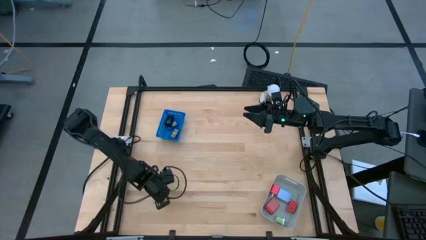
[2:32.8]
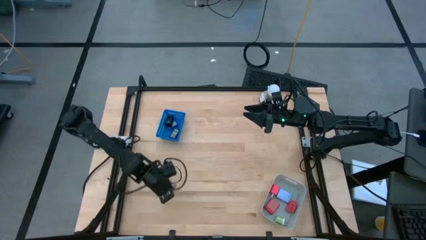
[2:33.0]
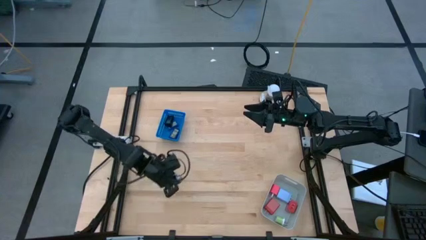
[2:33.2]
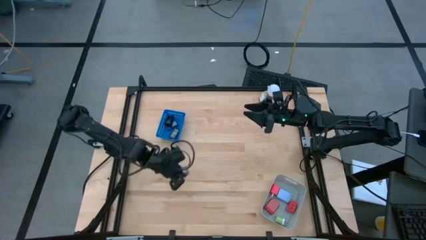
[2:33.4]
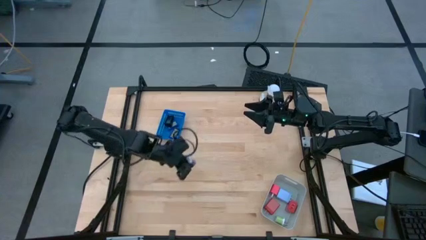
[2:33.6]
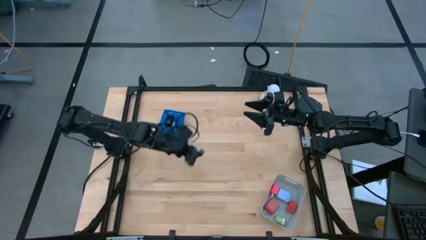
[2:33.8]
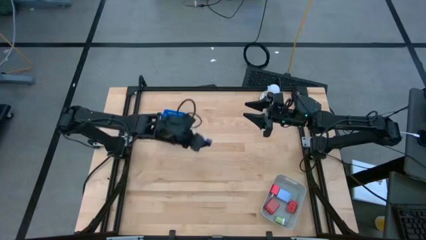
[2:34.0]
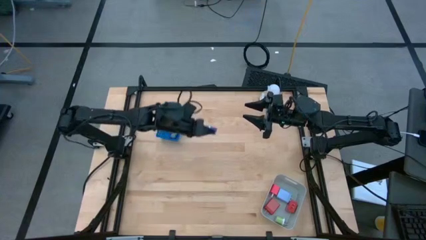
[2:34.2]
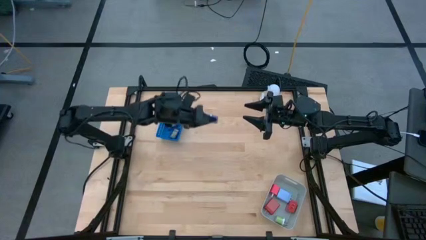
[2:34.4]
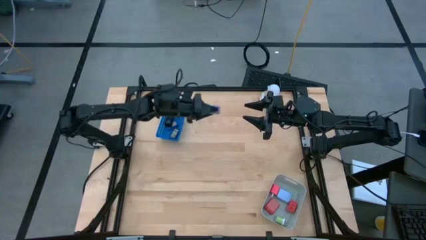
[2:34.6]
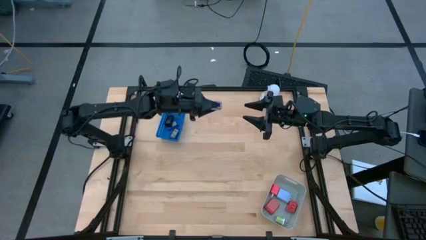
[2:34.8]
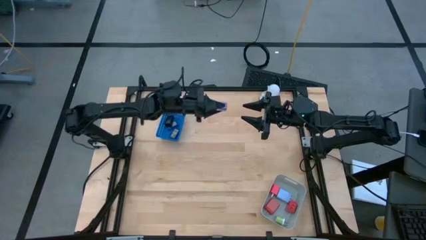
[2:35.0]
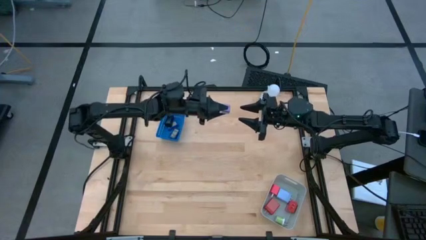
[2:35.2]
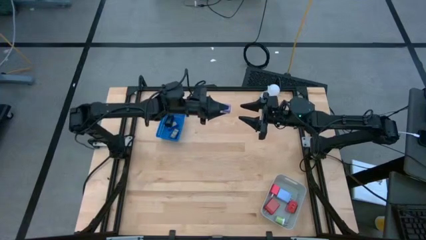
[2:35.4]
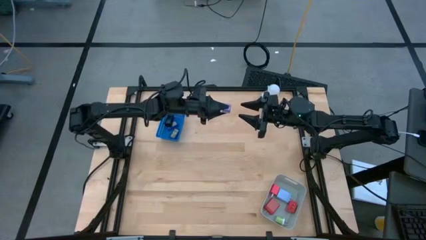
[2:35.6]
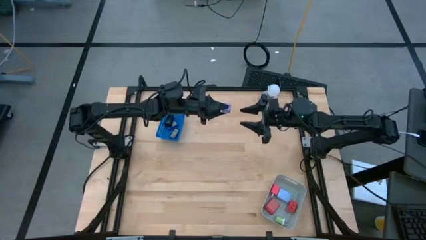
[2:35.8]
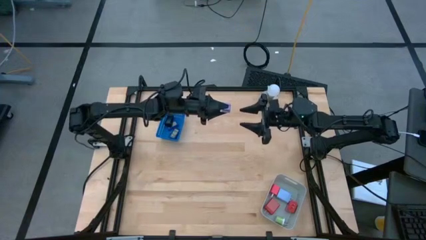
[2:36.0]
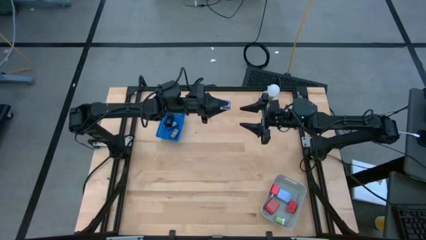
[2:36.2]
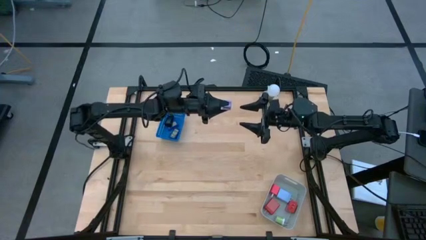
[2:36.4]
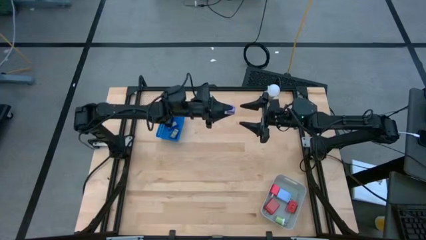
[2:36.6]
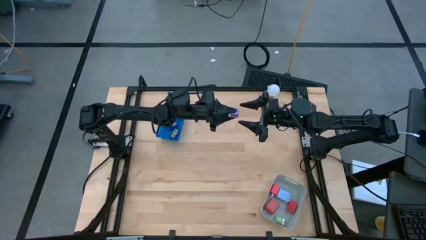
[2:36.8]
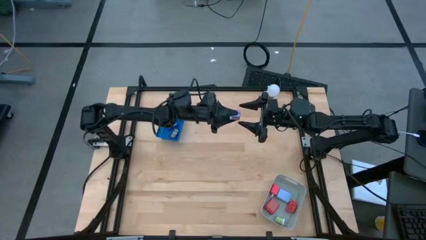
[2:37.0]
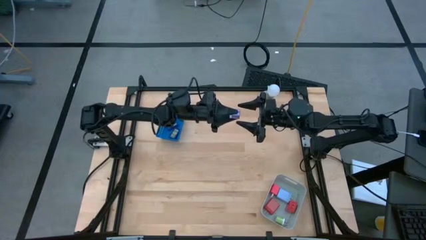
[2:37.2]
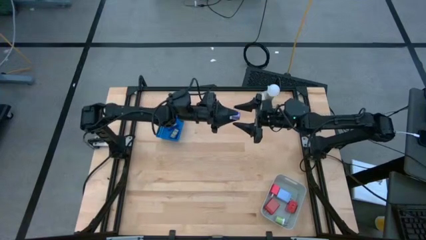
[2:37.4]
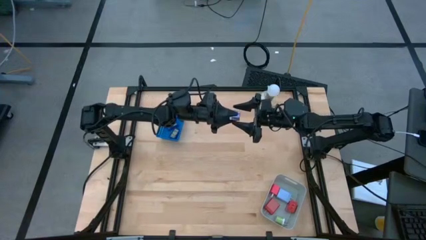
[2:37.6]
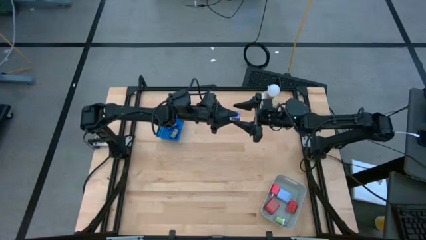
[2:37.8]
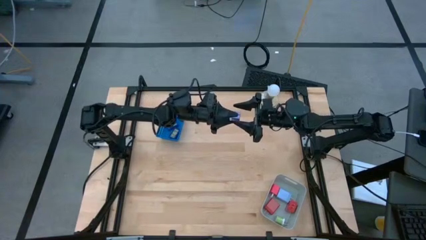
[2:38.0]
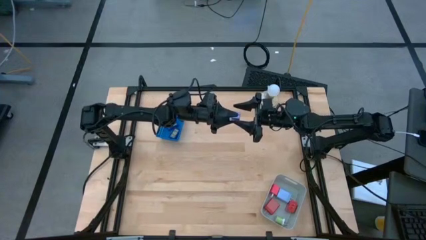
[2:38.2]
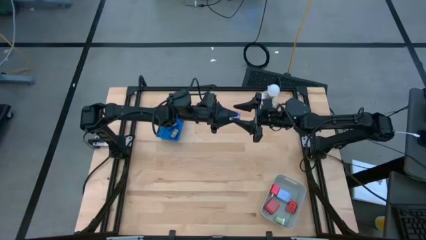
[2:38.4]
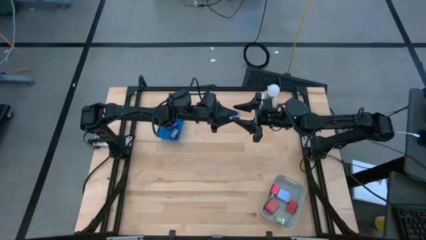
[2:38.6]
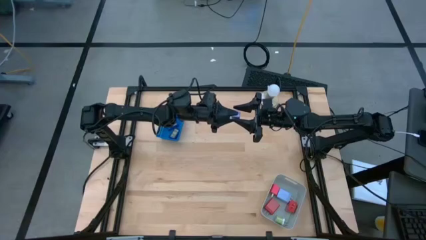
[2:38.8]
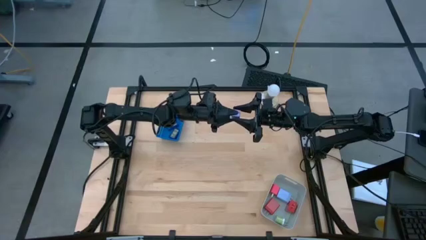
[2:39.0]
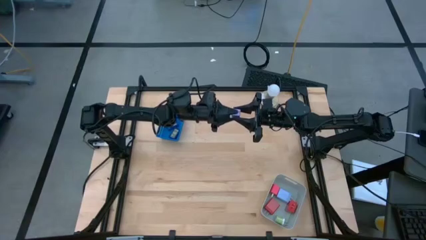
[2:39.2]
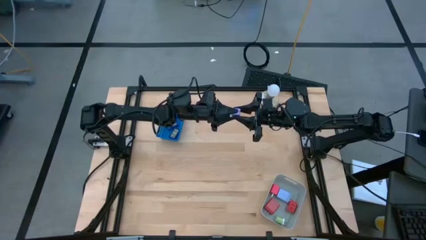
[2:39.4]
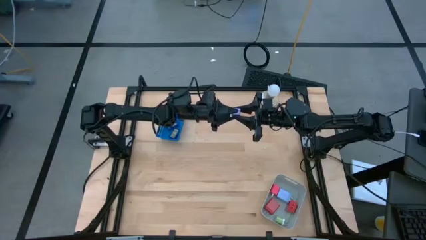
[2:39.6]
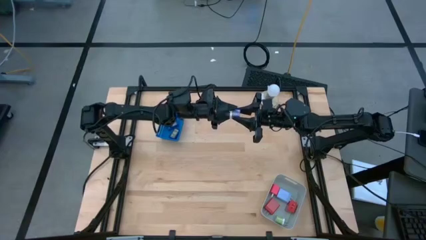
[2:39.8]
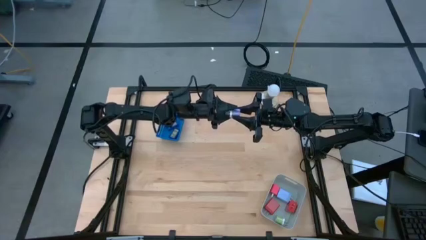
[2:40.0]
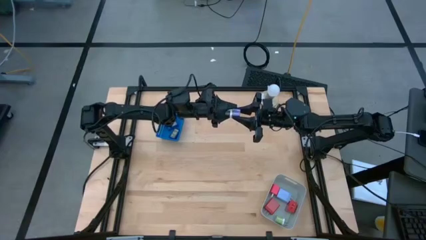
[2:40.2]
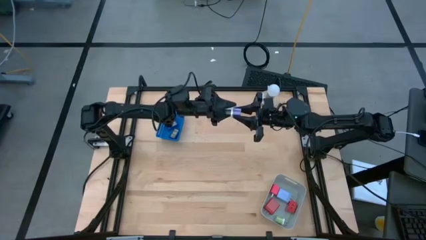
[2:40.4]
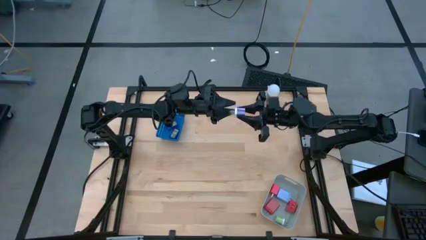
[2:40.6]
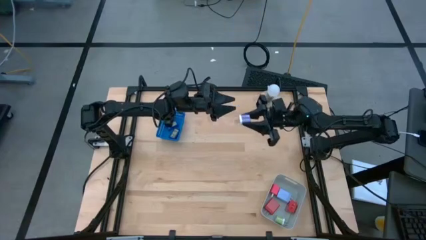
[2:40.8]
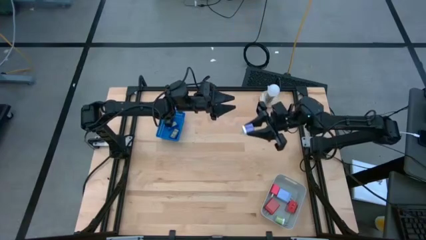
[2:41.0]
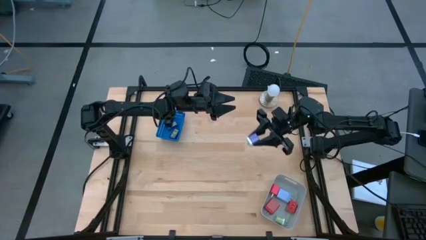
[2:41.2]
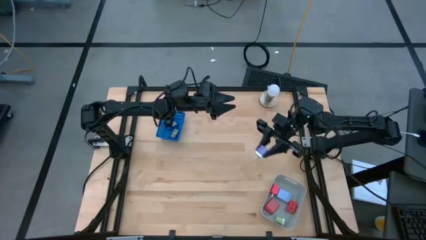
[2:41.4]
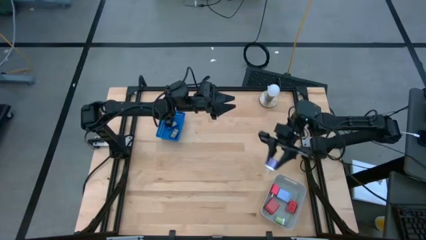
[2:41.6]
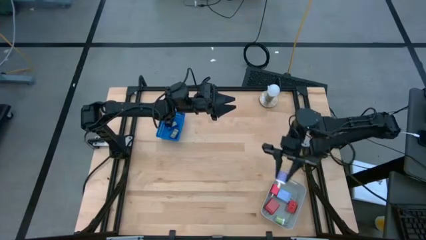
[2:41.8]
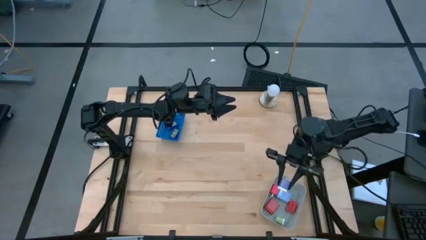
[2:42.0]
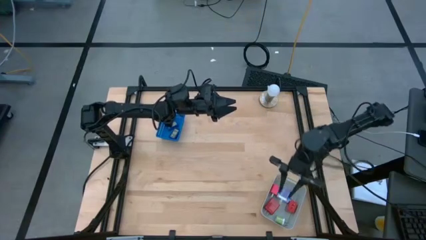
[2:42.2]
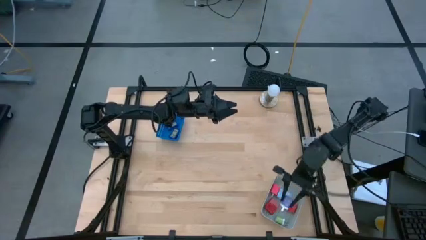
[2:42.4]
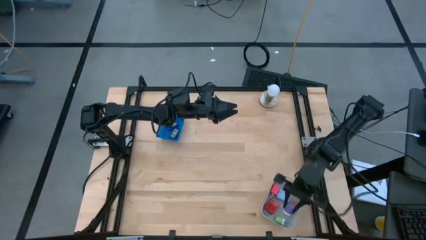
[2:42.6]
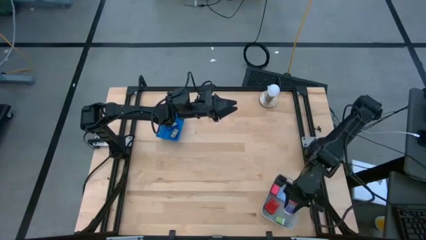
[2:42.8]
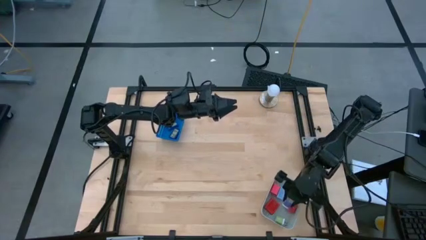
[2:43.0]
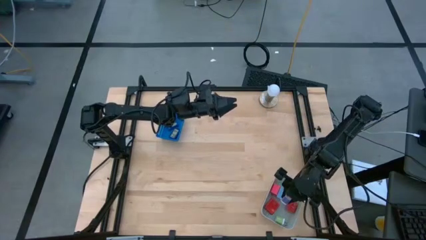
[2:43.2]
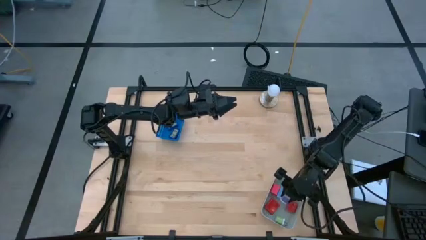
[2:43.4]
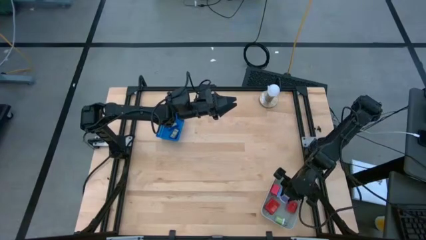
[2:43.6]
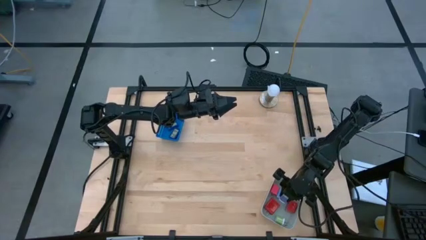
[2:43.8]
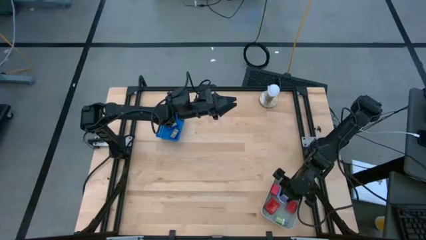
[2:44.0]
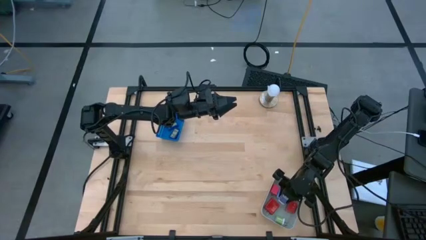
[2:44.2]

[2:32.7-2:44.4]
Task: Pick & Place Office items
Put the violet charger adapter into the white bin
